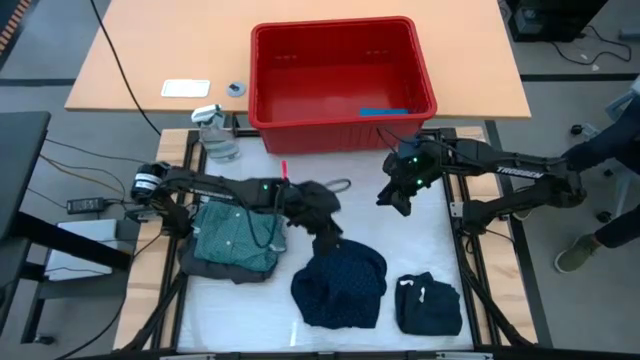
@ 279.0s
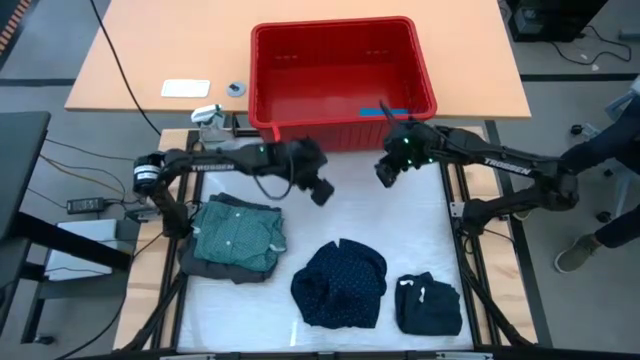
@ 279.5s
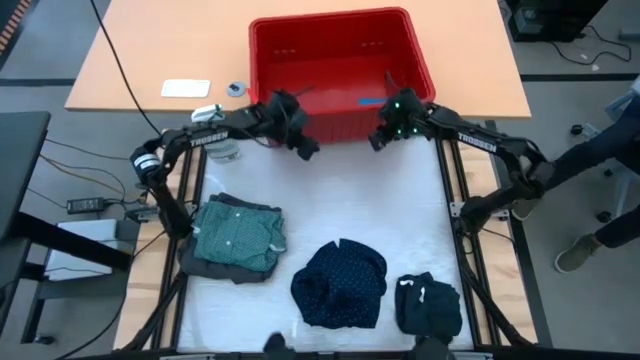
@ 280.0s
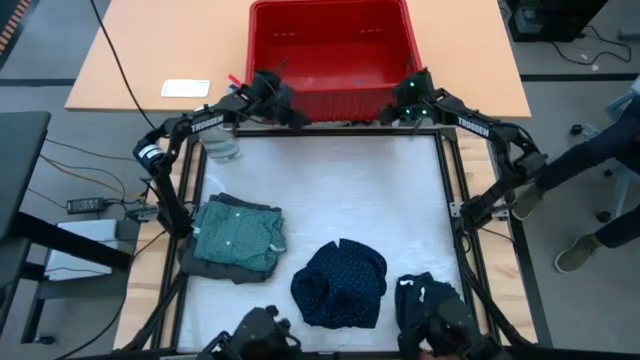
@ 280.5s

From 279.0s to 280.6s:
Task: Fold Laundry from Bin
Adjust the red organizer bin on the table

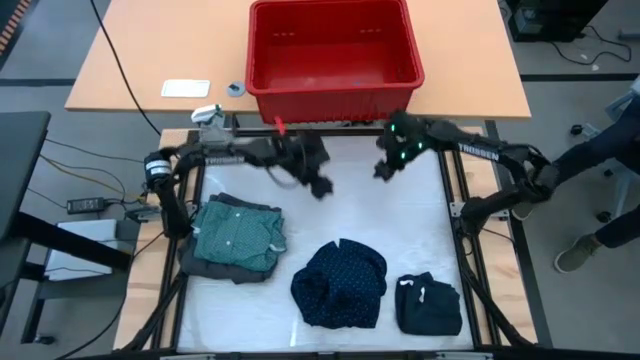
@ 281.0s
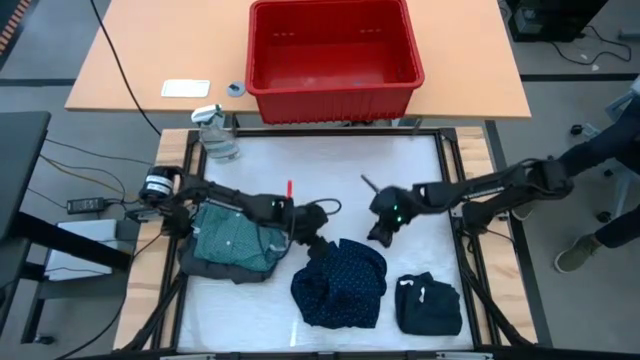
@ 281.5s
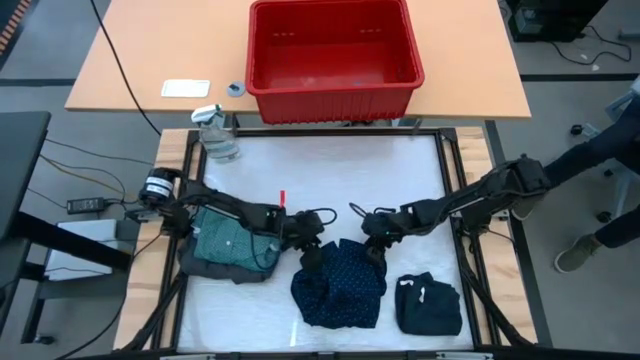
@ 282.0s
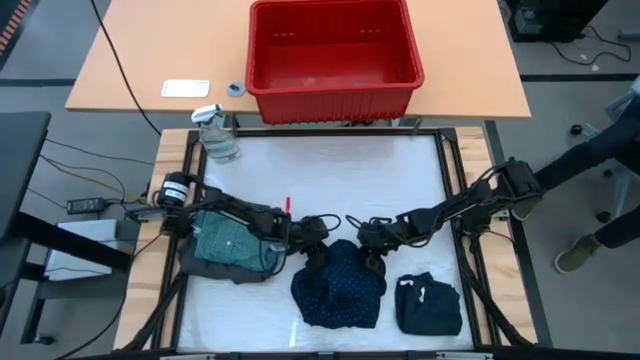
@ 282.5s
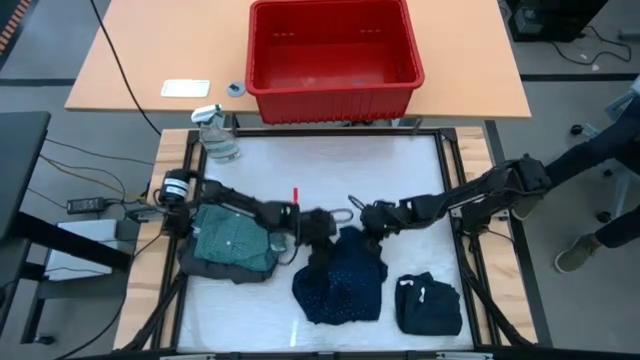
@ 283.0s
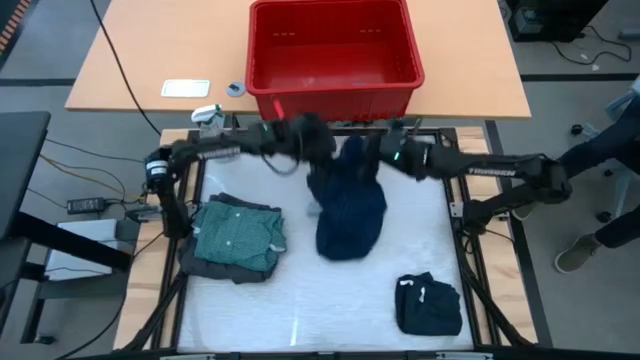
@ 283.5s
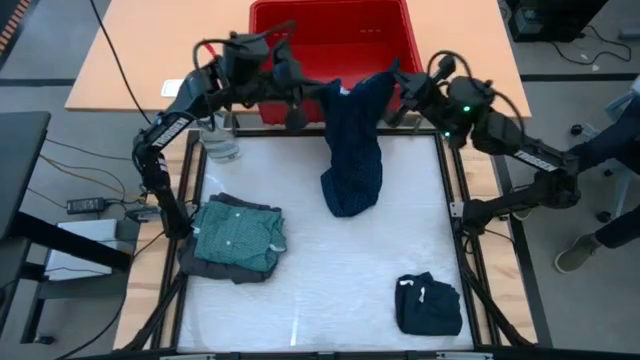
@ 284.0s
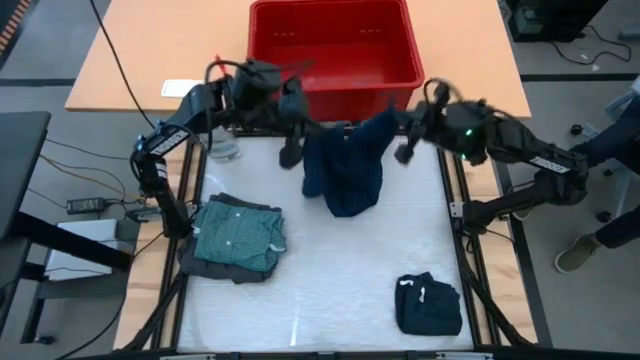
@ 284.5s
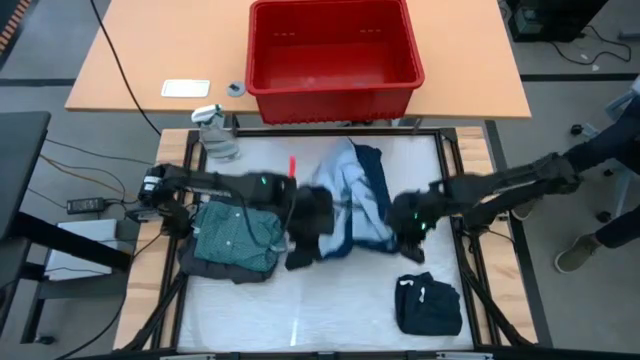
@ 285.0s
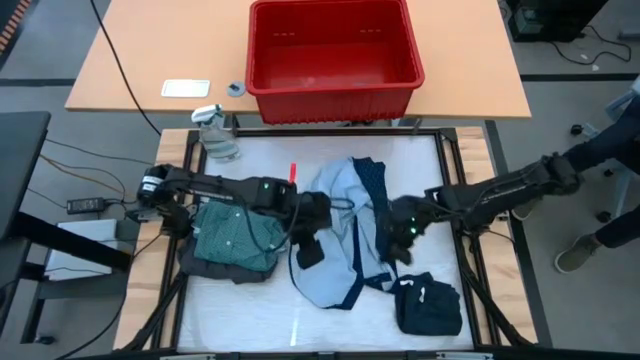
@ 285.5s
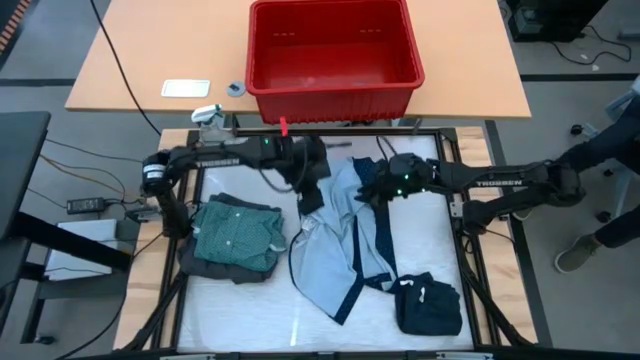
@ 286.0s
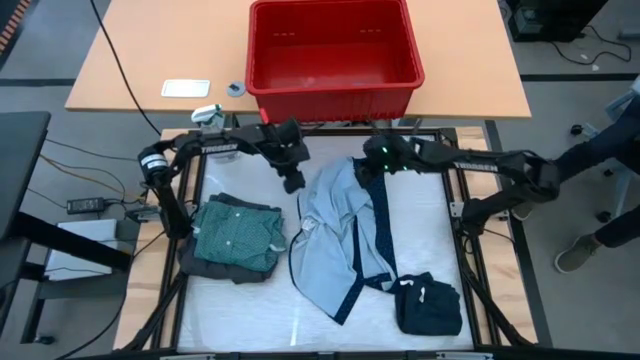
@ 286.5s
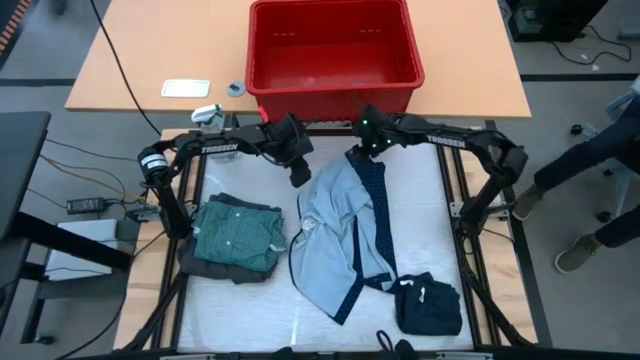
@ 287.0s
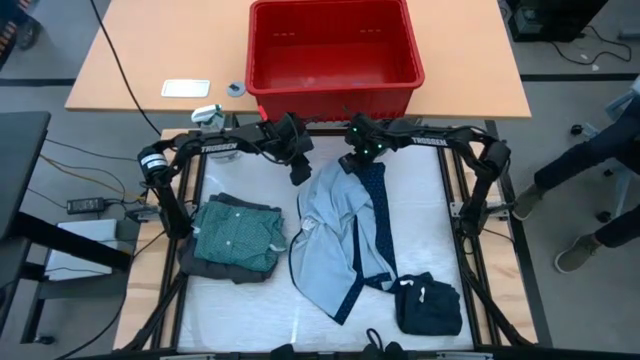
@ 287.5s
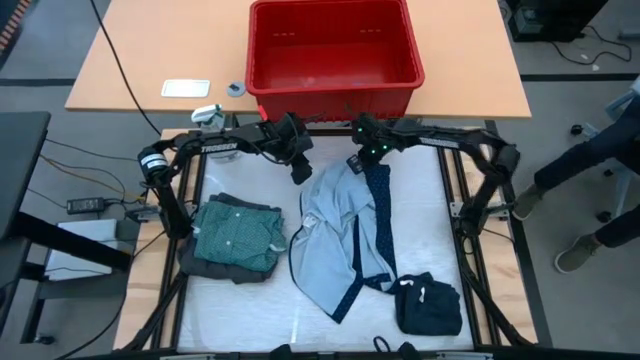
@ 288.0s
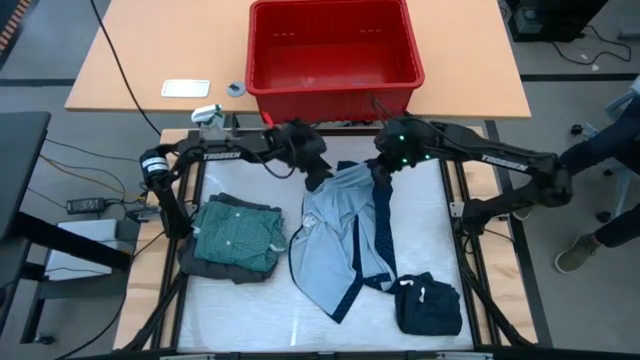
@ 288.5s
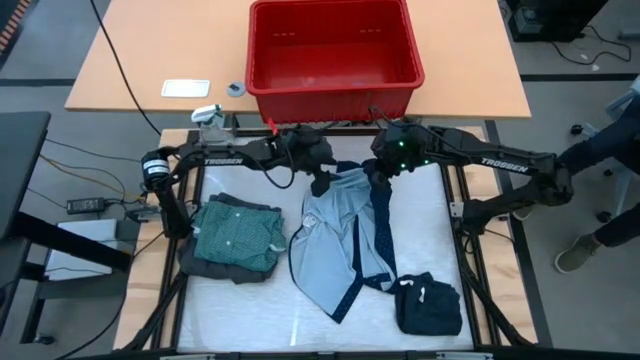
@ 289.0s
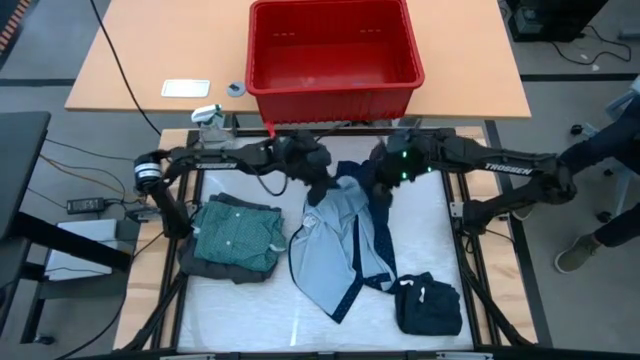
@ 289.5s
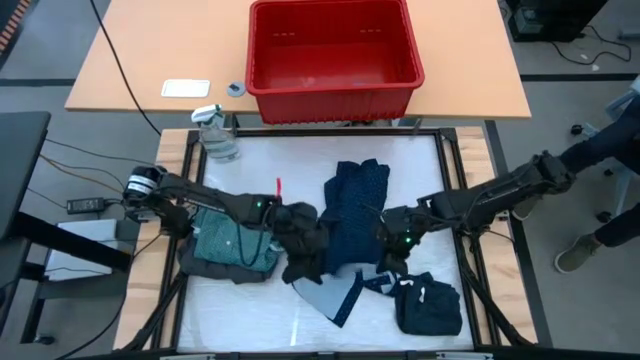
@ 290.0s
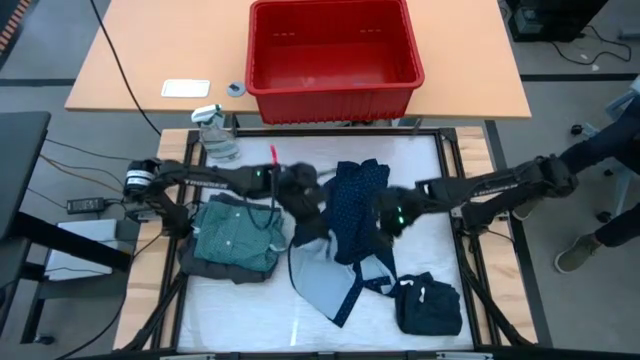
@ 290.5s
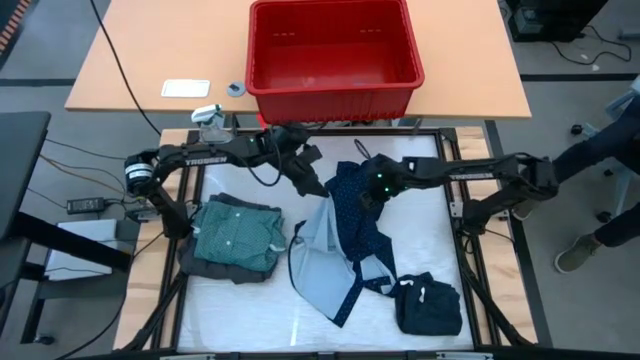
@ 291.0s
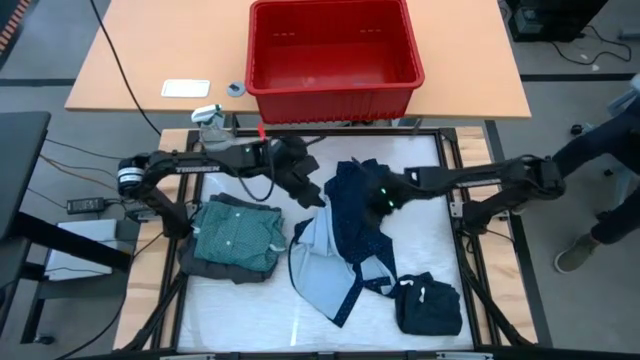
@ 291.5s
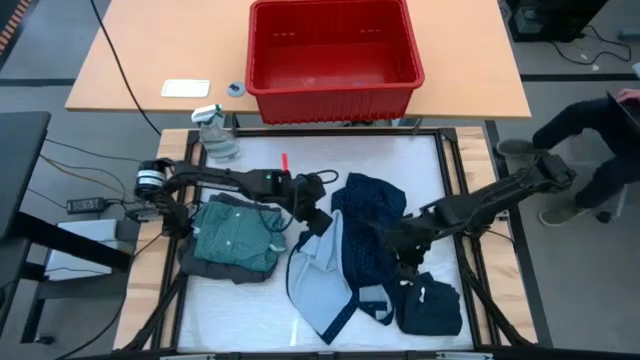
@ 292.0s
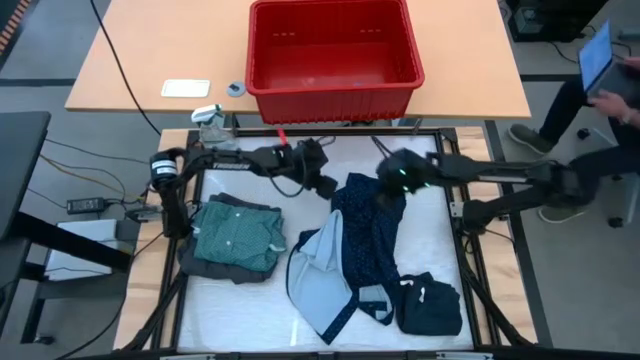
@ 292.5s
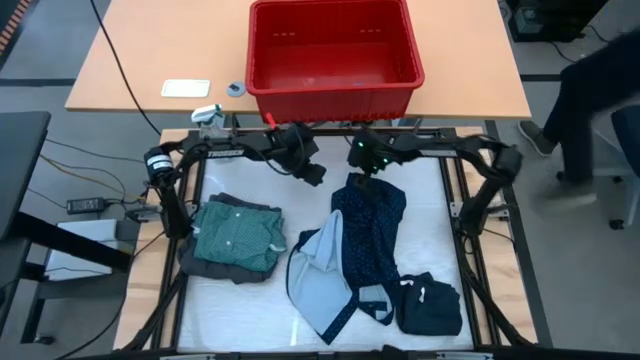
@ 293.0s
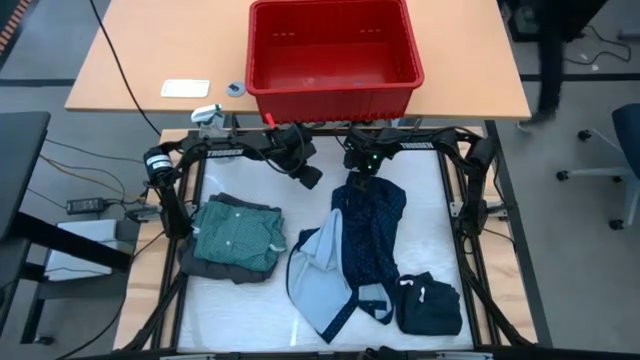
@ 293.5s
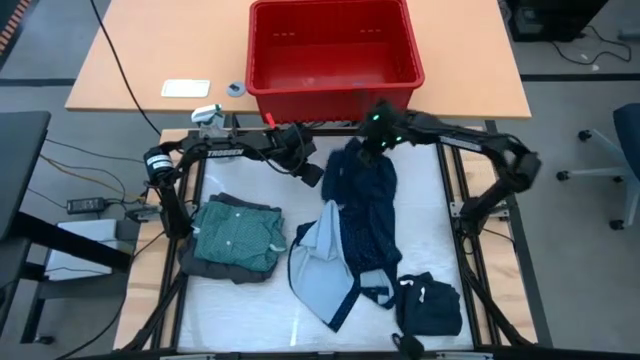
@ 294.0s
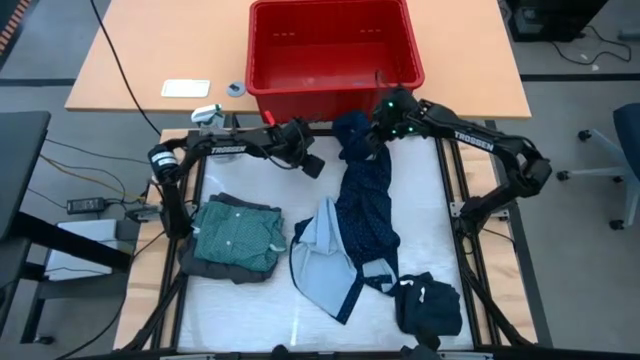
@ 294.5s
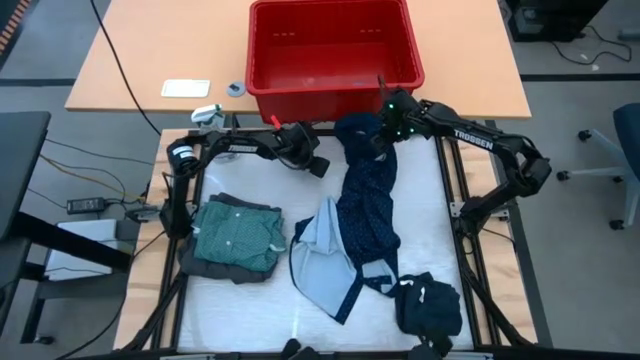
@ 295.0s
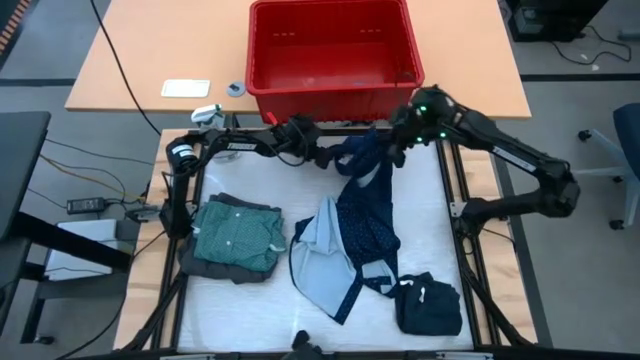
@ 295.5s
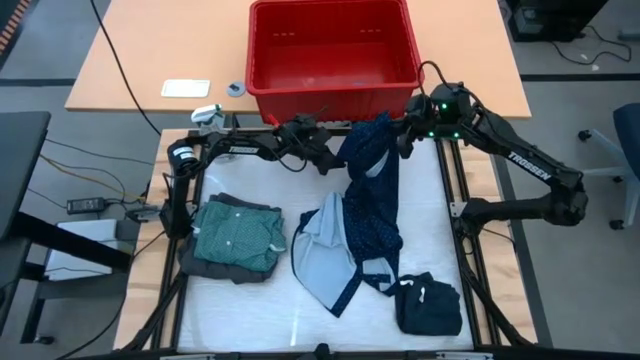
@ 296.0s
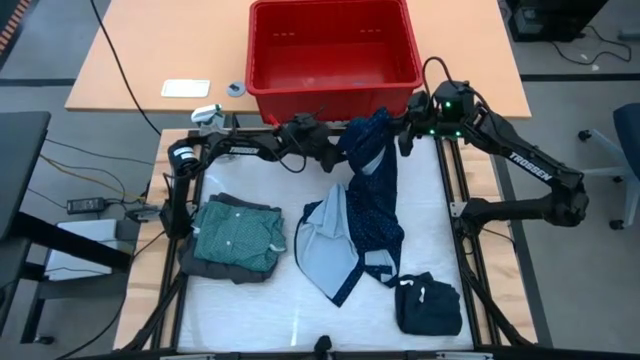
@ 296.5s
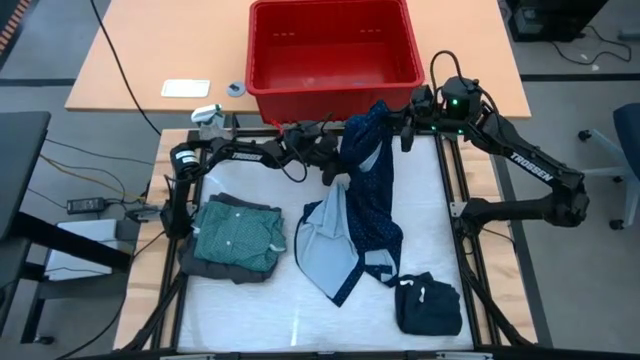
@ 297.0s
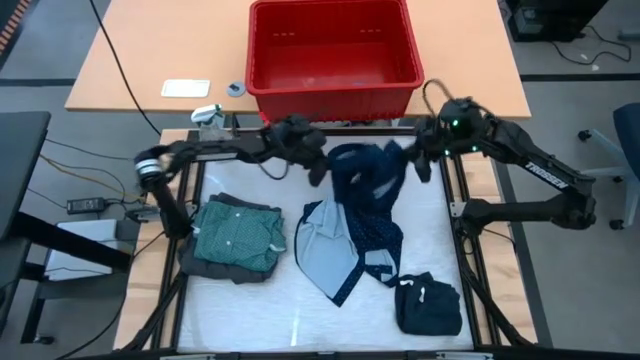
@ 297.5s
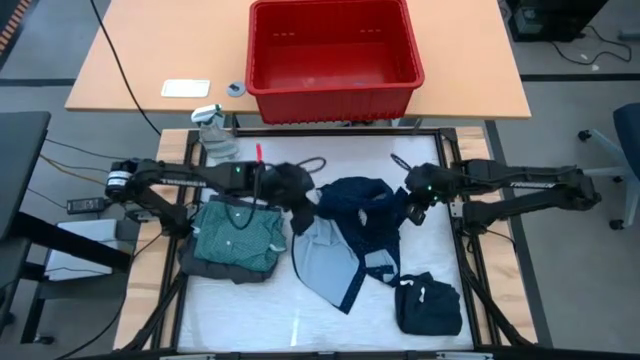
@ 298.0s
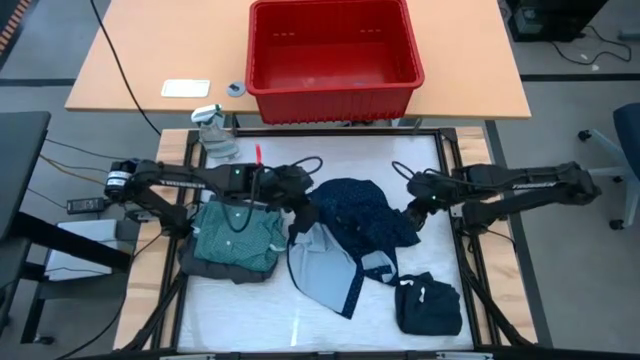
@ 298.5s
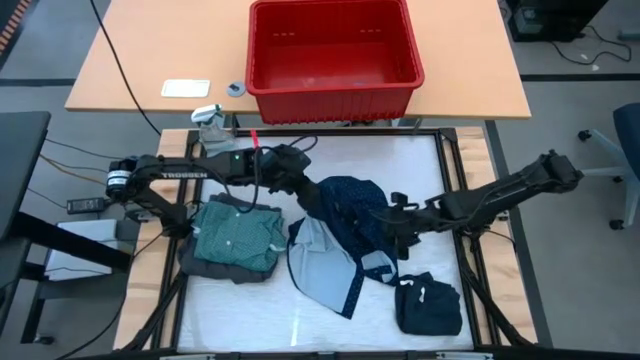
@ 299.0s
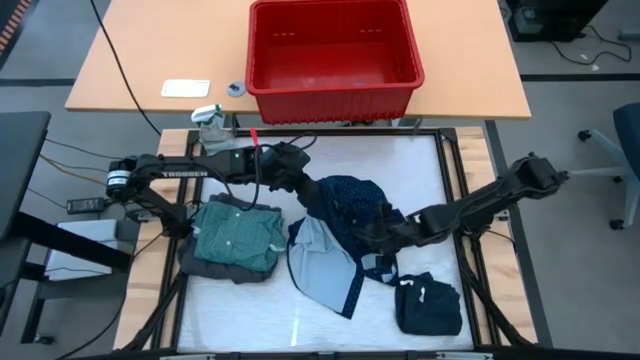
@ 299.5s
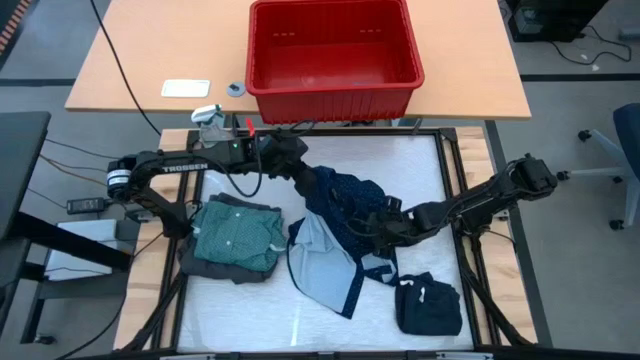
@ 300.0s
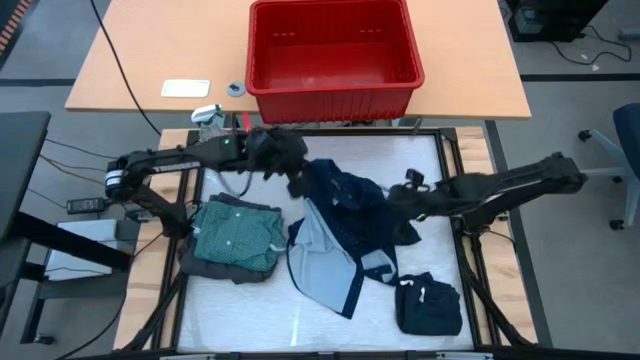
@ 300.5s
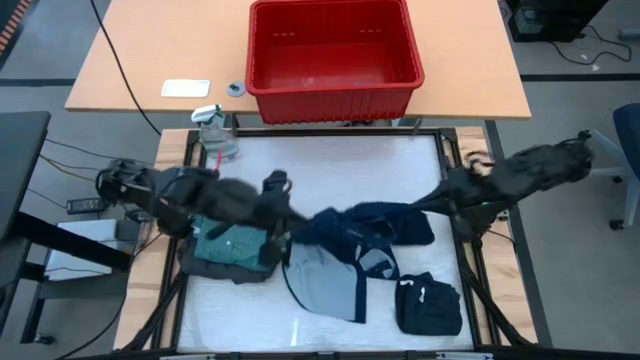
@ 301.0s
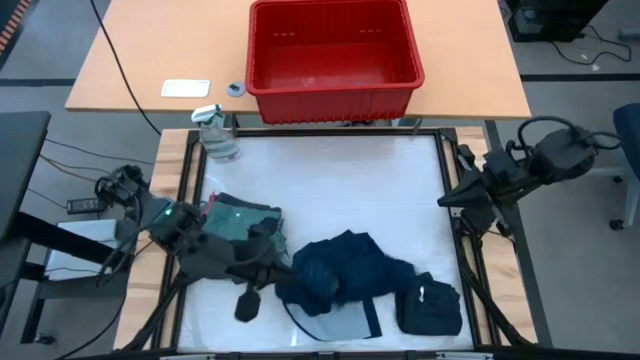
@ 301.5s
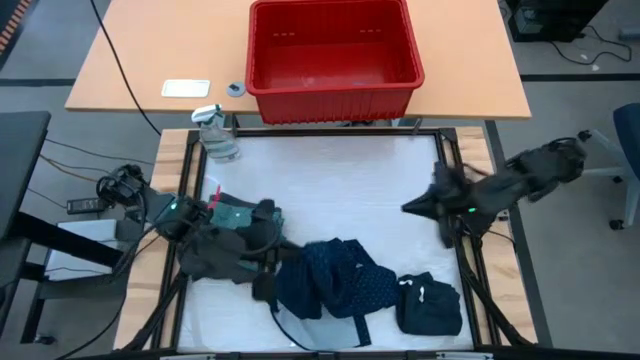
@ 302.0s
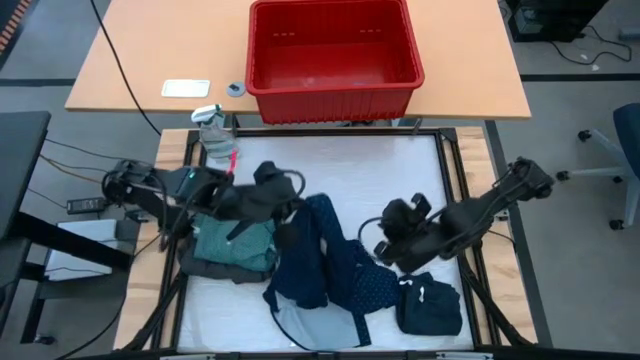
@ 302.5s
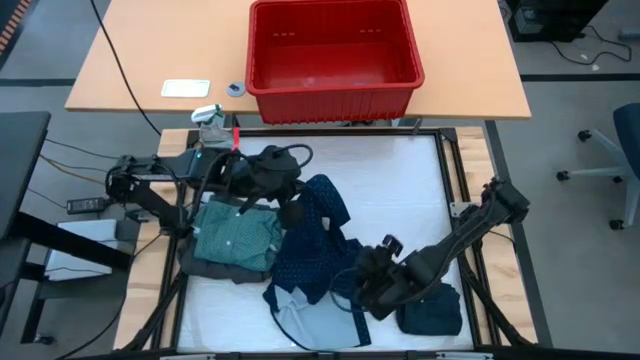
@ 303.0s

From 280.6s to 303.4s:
Fold the blue polo shirt on the table
